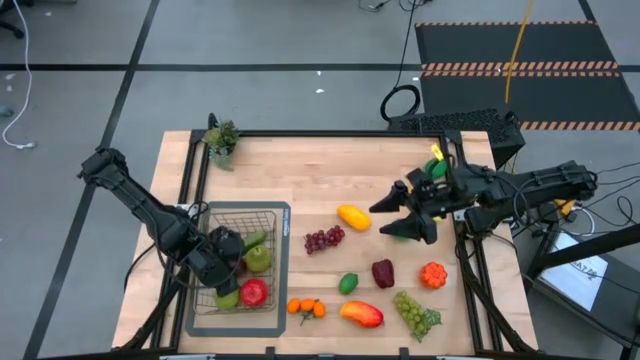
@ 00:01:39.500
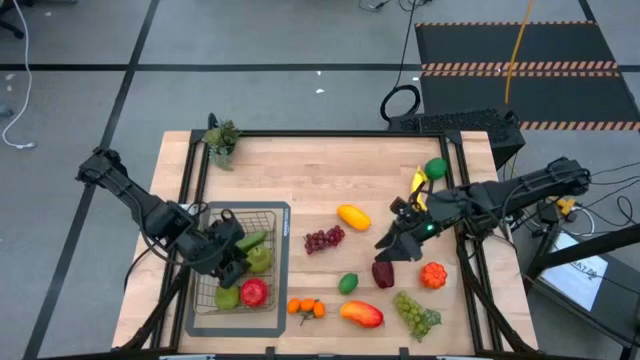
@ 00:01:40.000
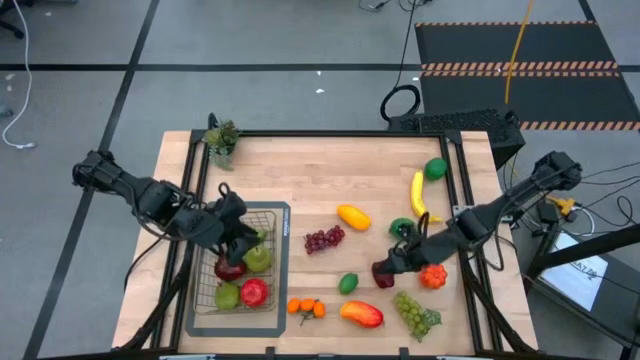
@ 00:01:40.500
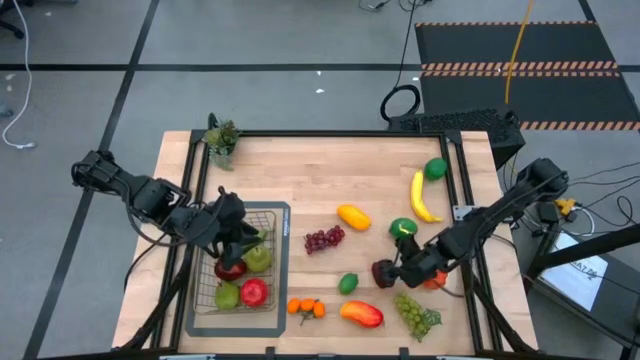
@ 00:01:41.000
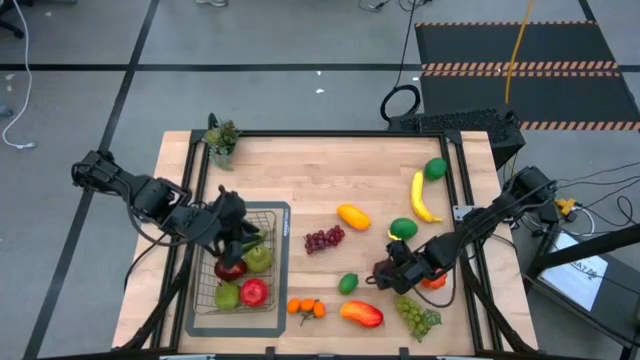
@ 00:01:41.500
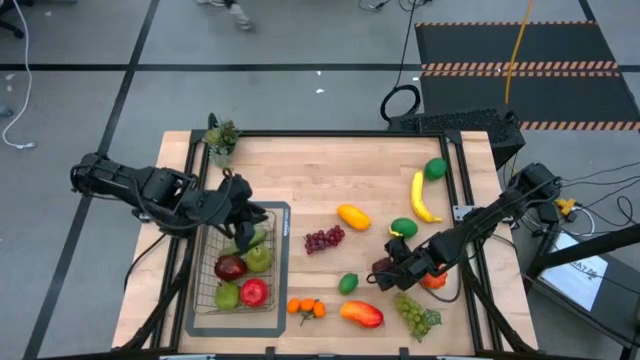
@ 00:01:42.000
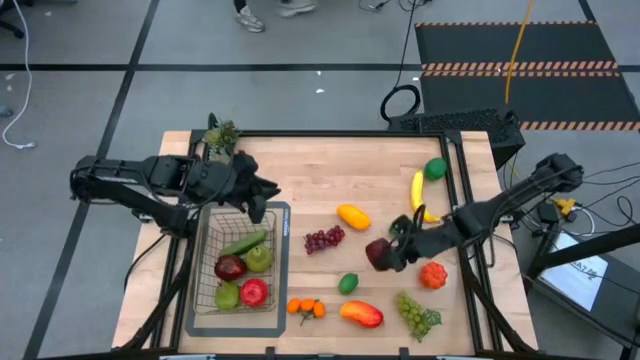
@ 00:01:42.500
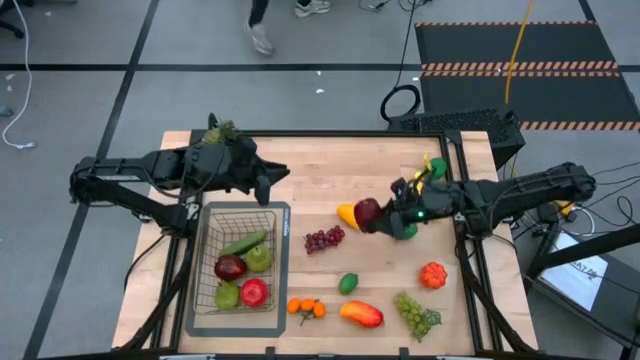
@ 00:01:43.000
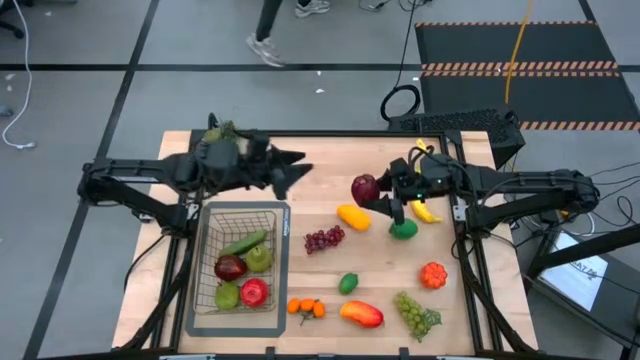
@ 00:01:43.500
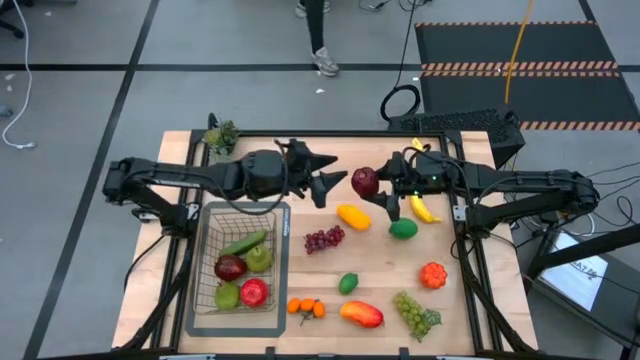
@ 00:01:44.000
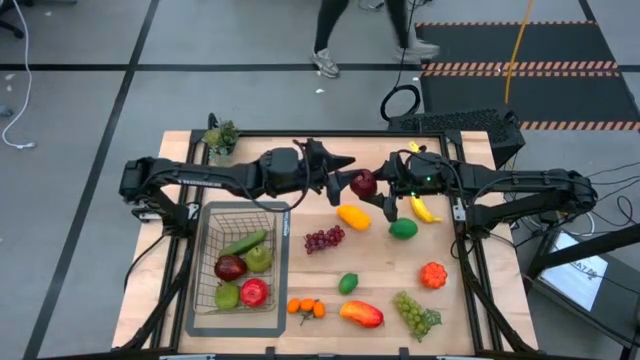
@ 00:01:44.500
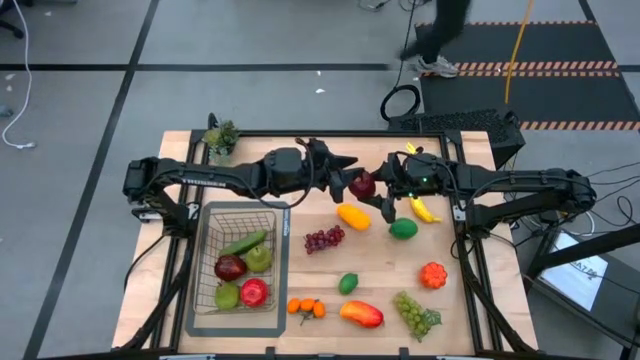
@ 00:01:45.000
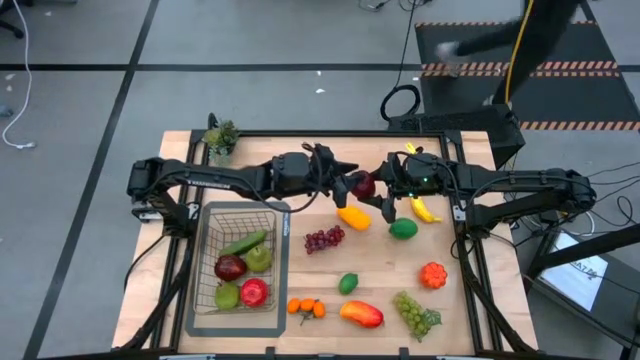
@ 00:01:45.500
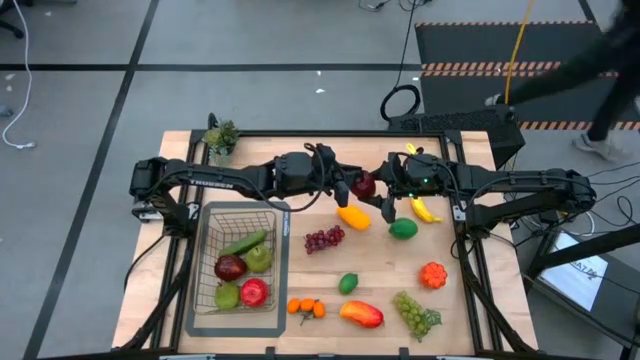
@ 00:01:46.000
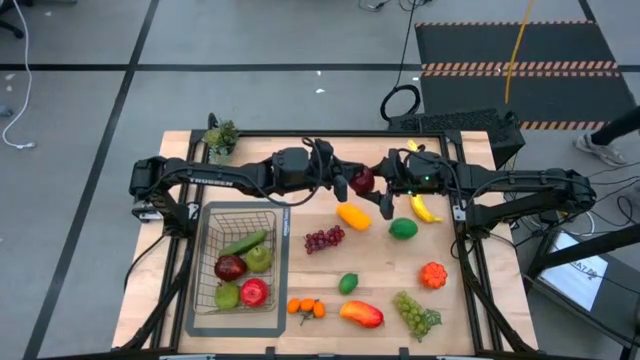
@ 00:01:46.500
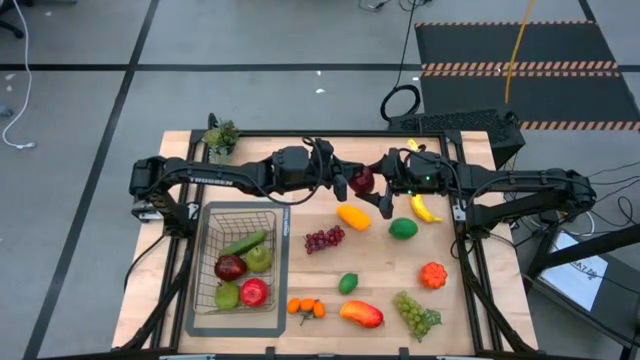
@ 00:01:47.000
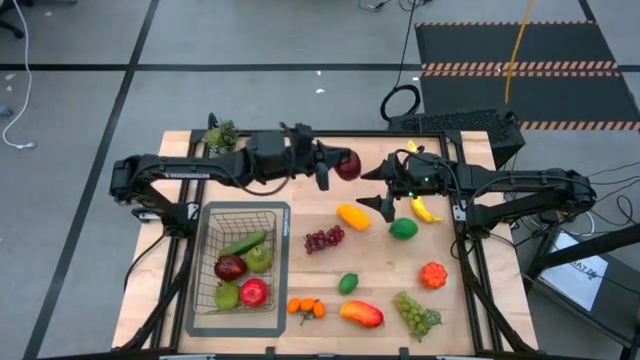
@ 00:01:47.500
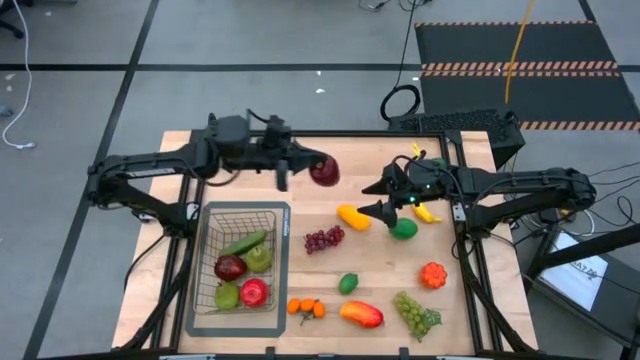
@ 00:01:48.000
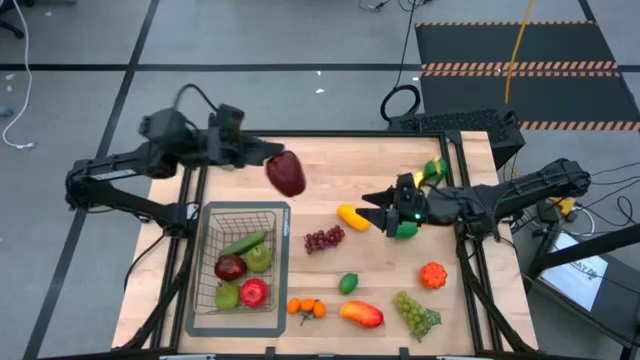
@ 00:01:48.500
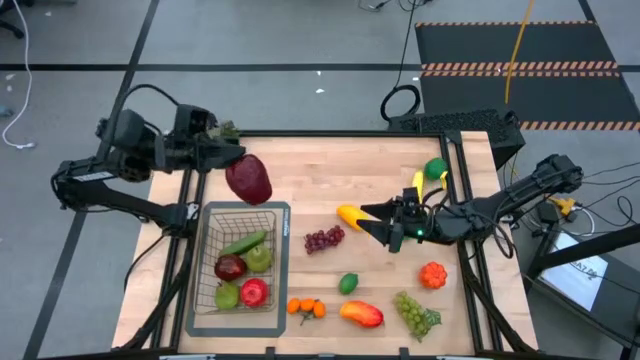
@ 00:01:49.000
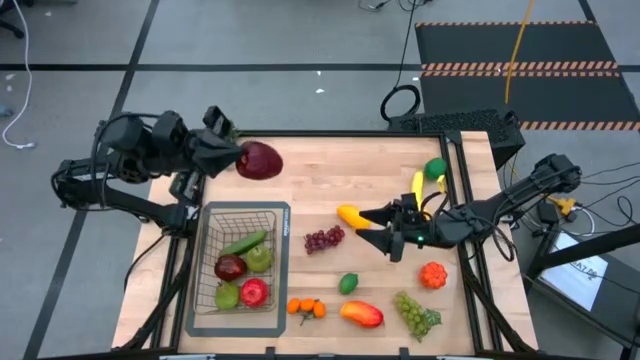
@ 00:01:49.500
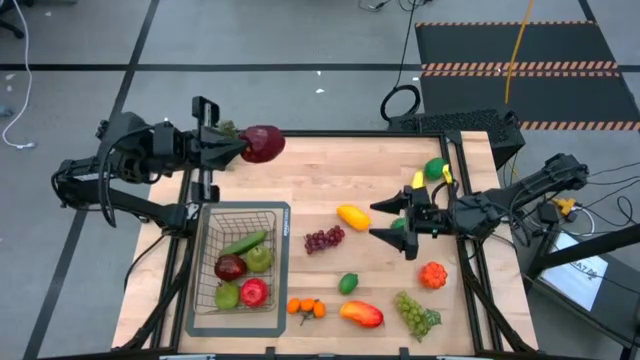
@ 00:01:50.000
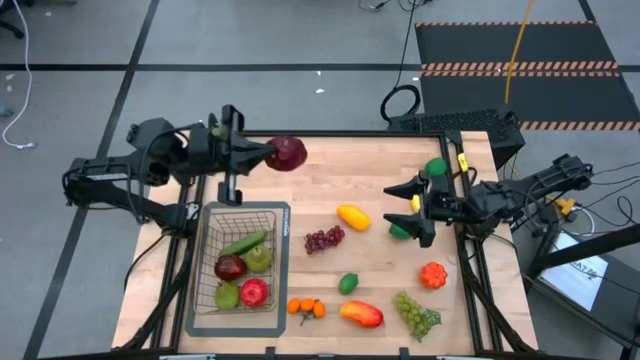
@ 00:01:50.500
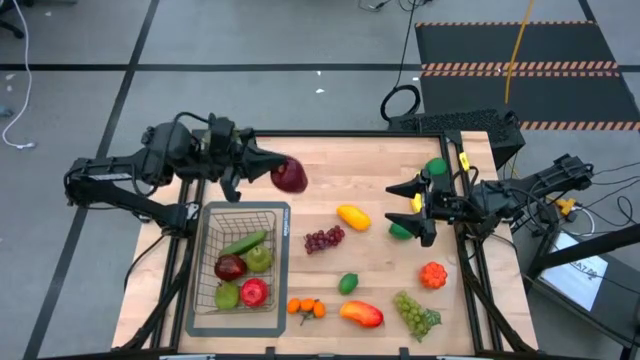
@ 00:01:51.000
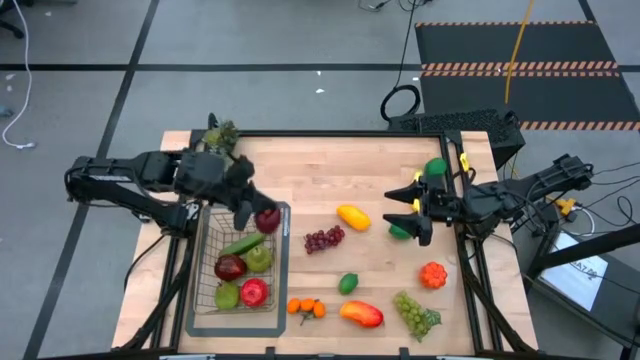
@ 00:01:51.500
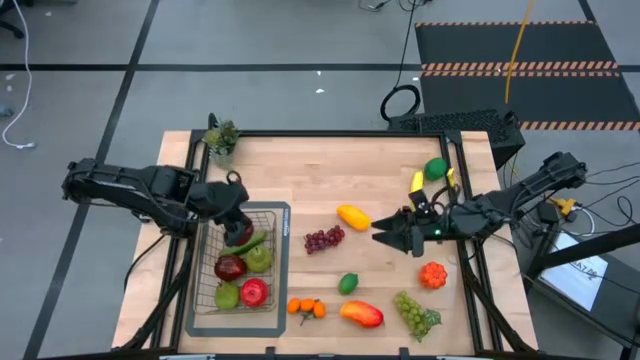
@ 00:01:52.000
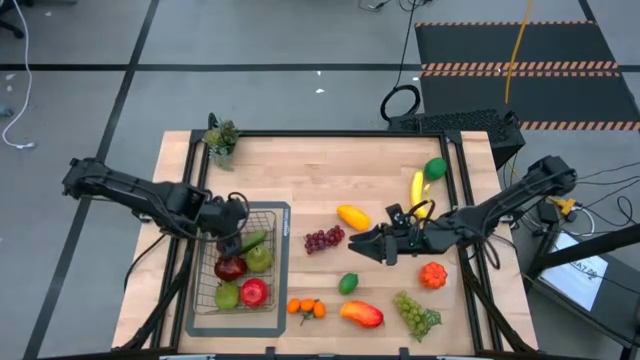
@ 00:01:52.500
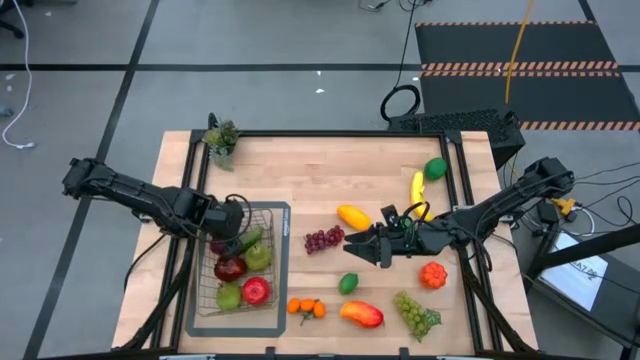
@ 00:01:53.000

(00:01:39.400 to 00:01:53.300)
Task: Build produce basket
Put the dark red apple into the wire basket

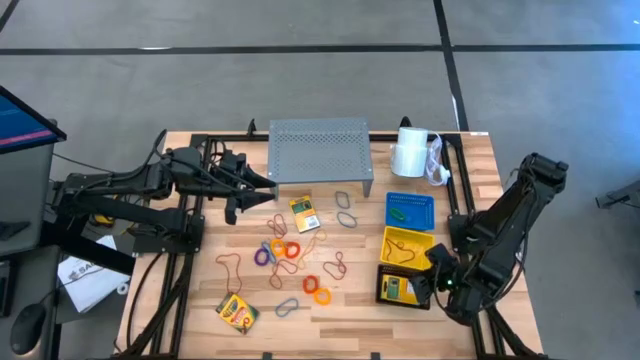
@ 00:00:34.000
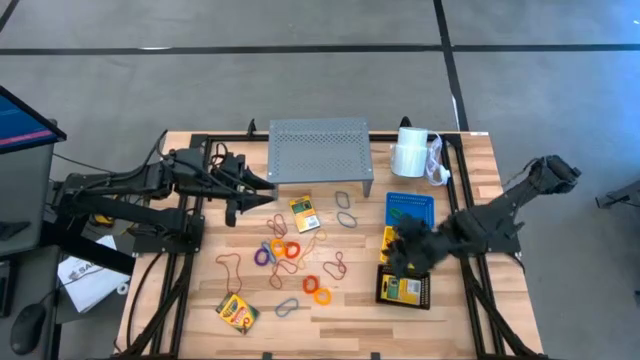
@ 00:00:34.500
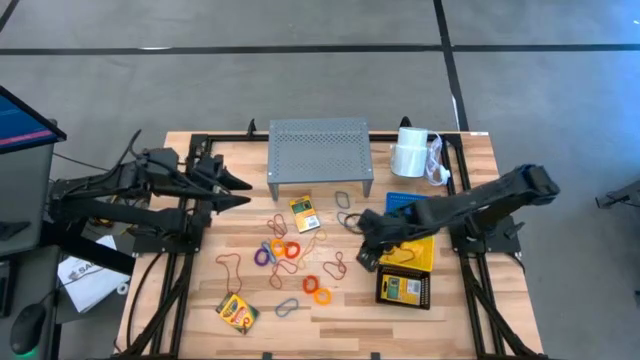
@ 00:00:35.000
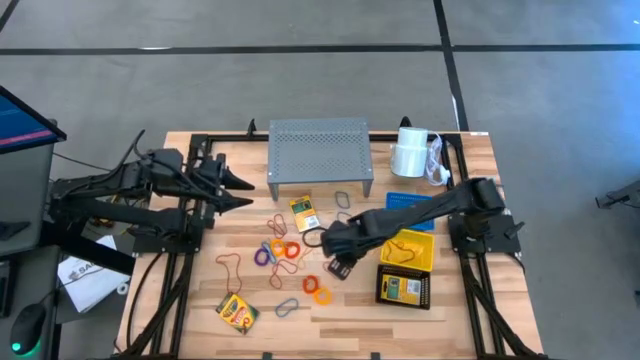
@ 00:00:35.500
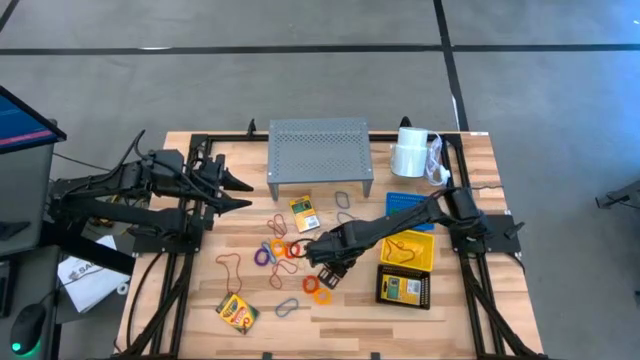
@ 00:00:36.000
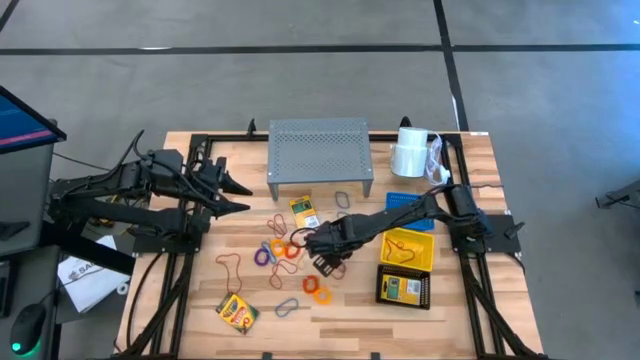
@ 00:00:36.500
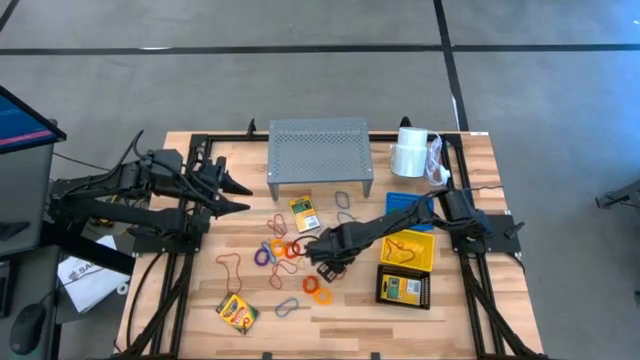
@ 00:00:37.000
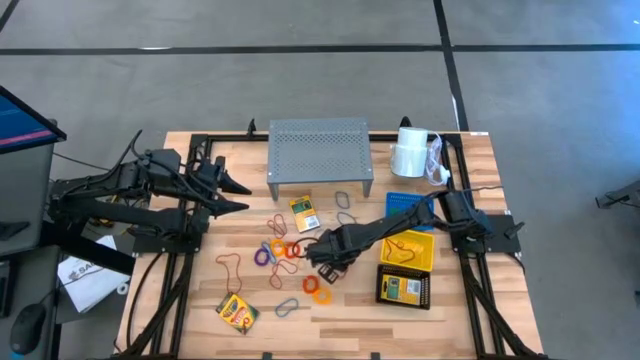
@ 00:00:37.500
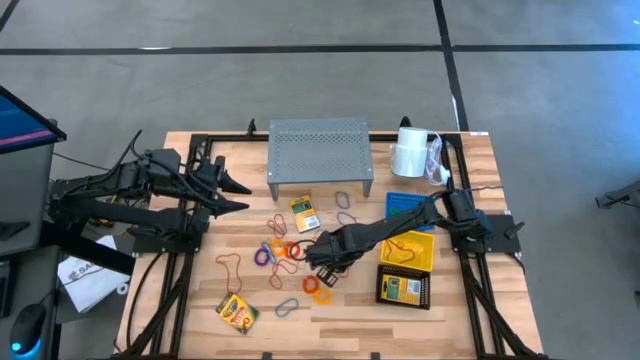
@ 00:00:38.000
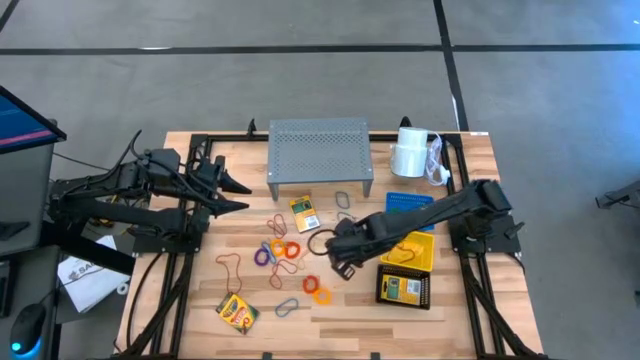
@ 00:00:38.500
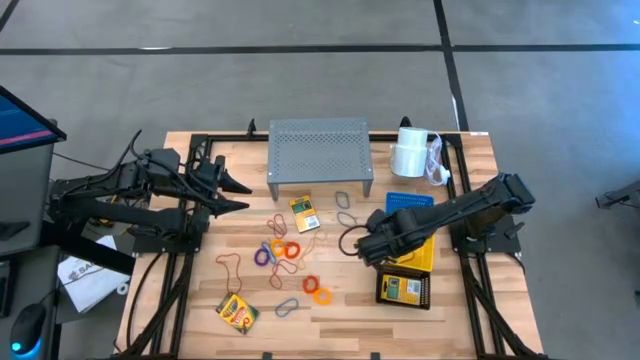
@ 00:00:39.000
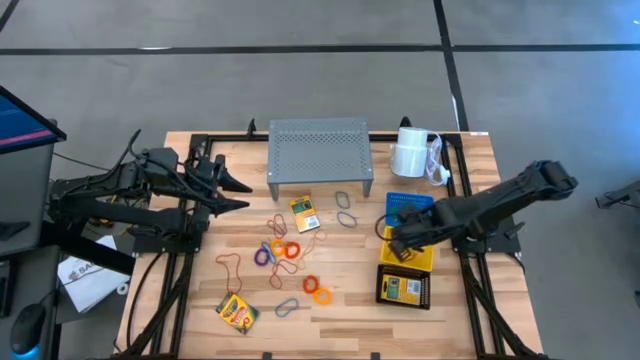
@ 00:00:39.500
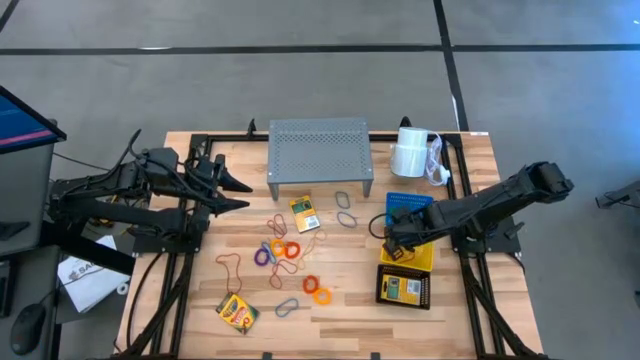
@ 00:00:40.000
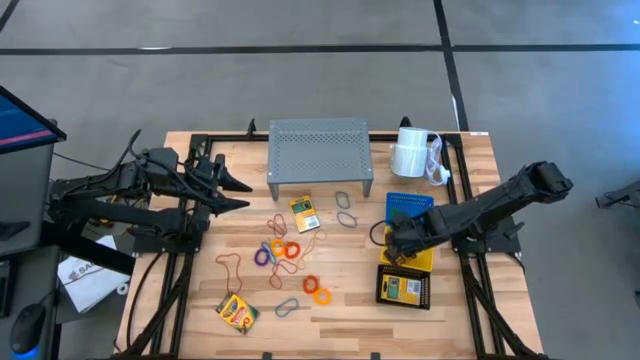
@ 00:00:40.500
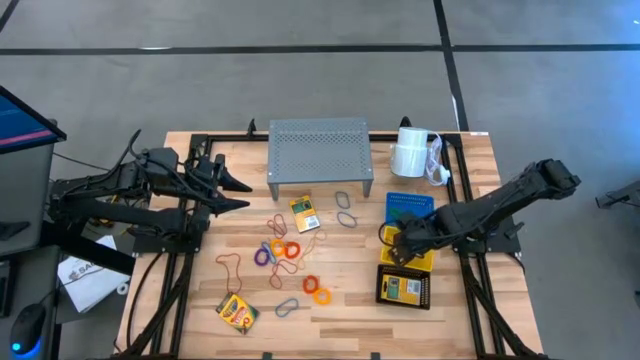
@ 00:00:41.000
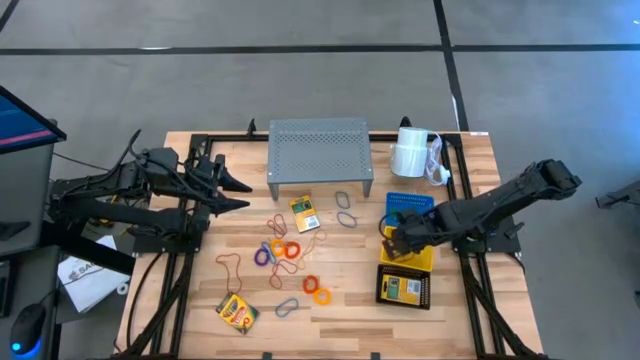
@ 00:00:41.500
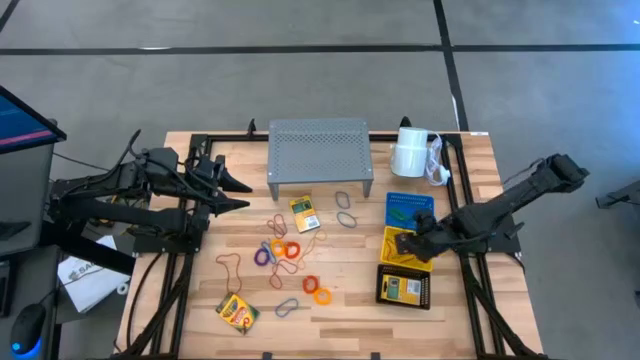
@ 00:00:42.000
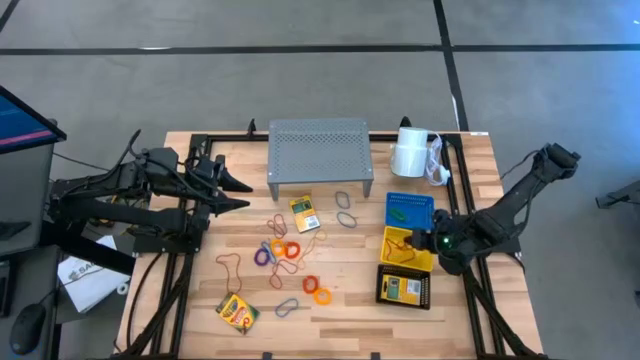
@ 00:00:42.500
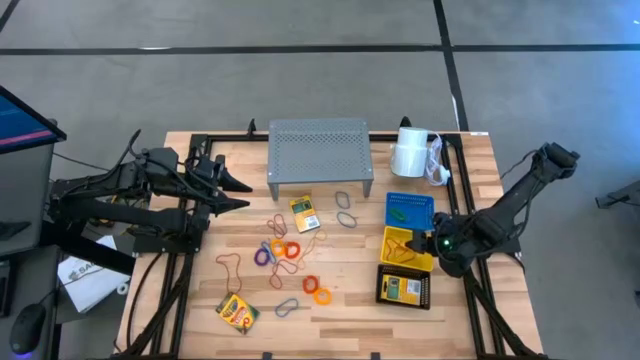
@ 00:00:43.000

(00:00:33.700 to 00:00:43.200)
Task: Pick & Place Office Desk Supplies
Put the red rubber band into the yellow basket
